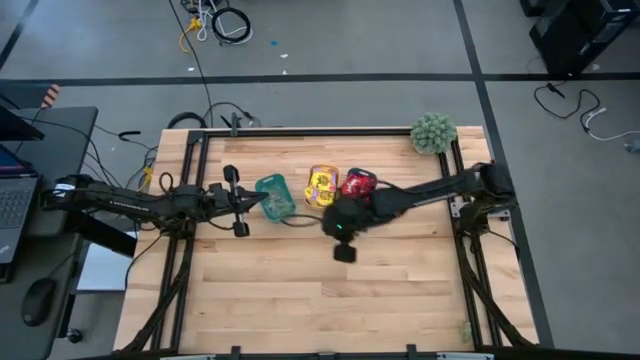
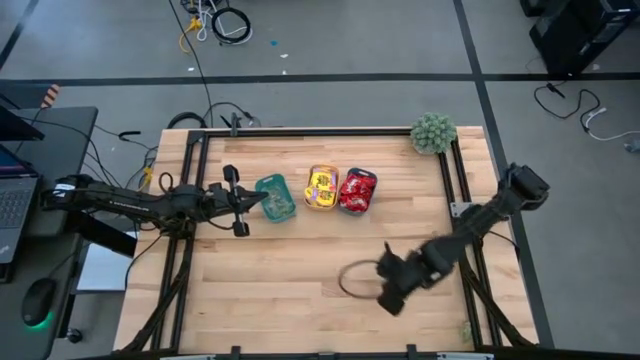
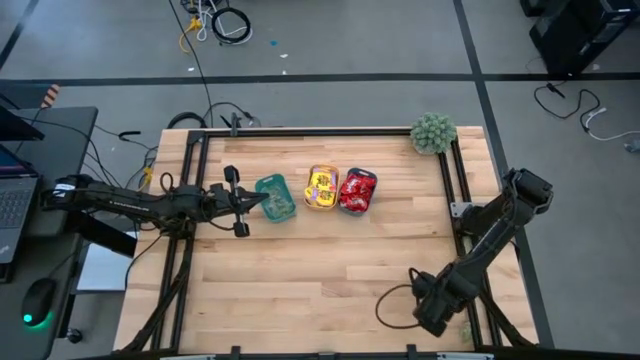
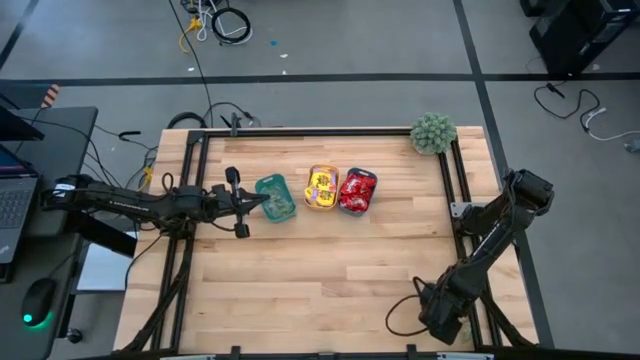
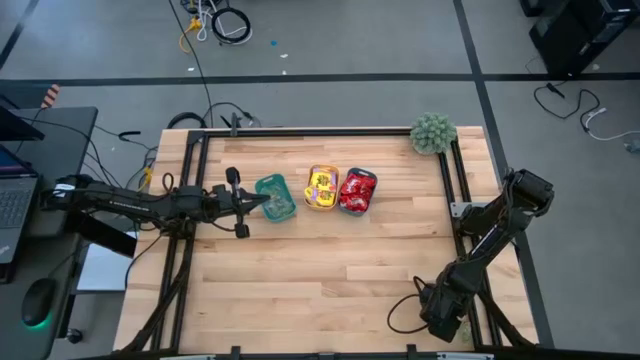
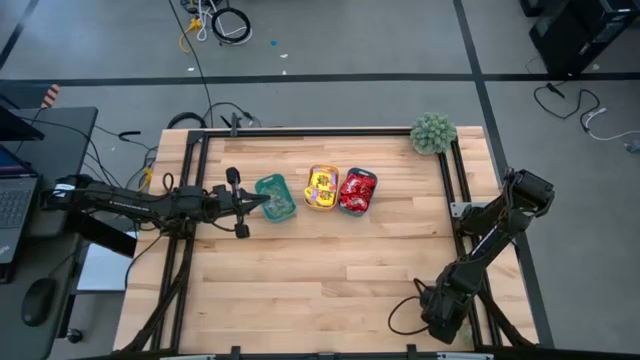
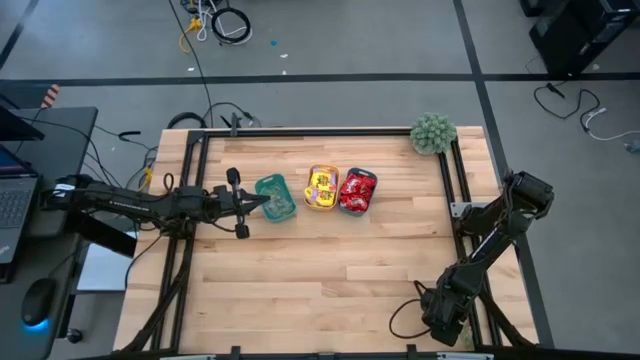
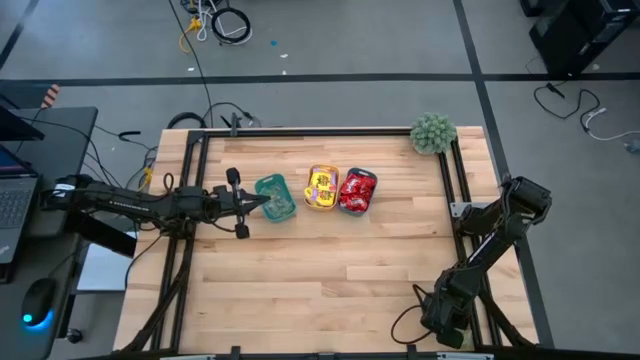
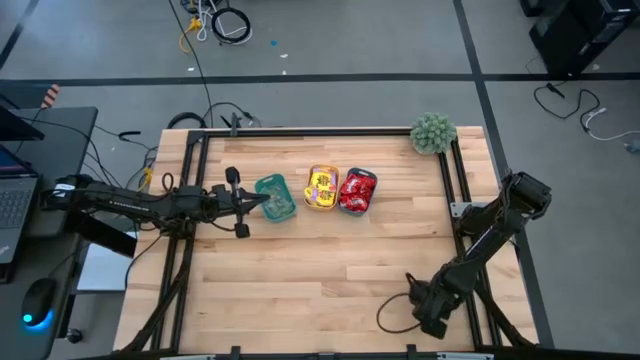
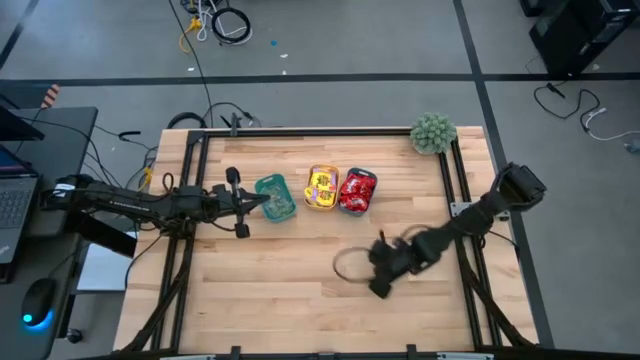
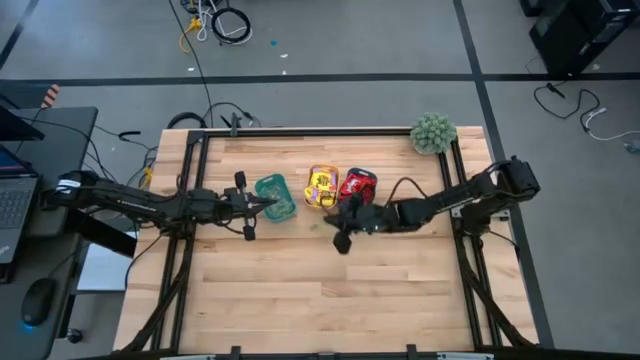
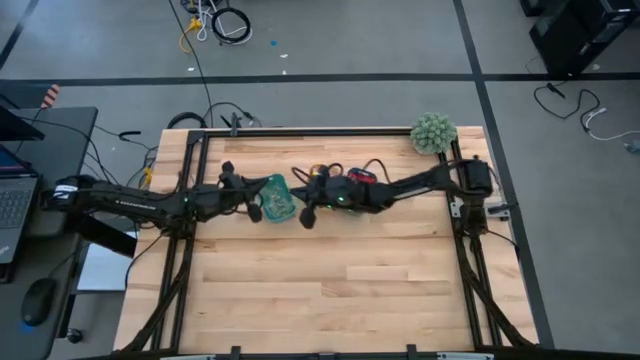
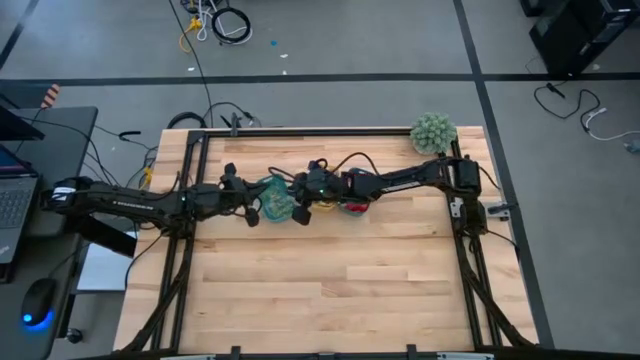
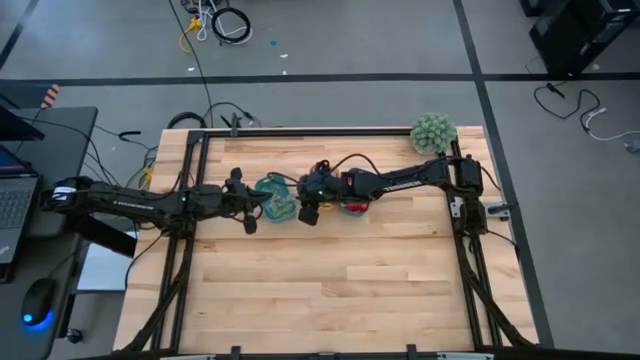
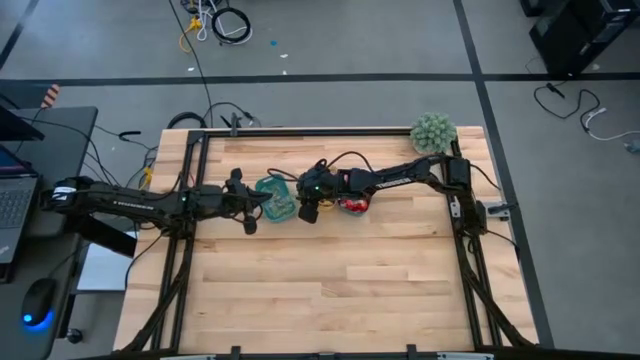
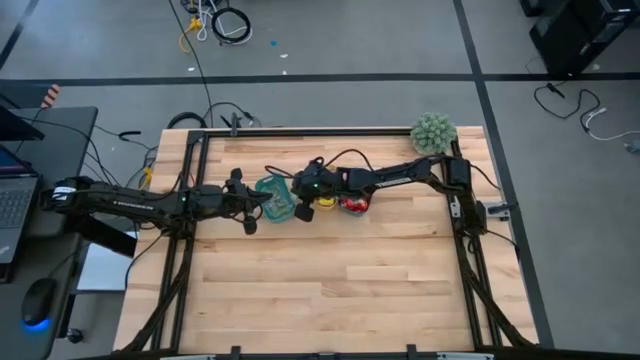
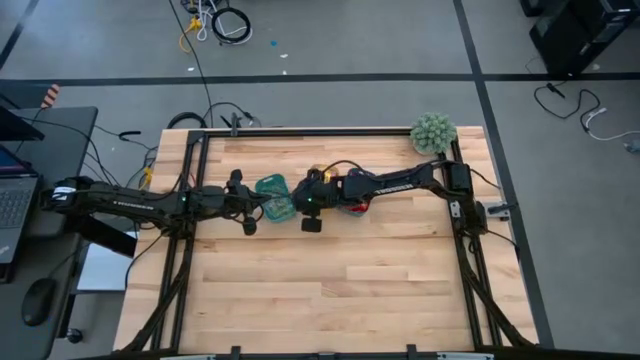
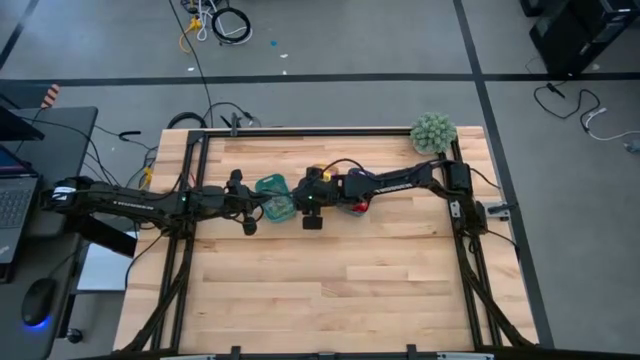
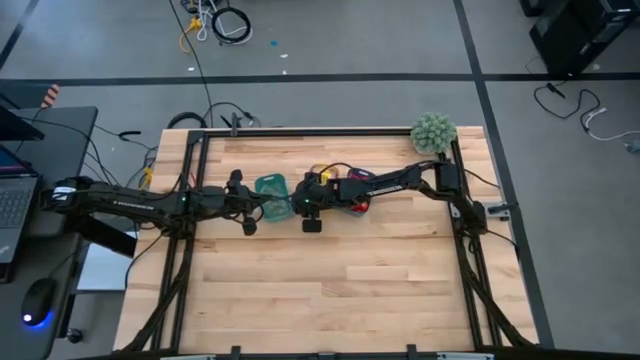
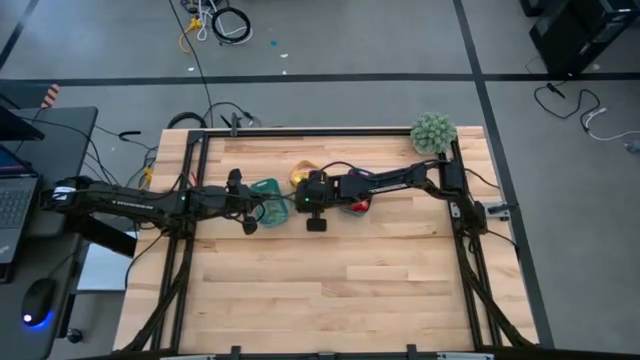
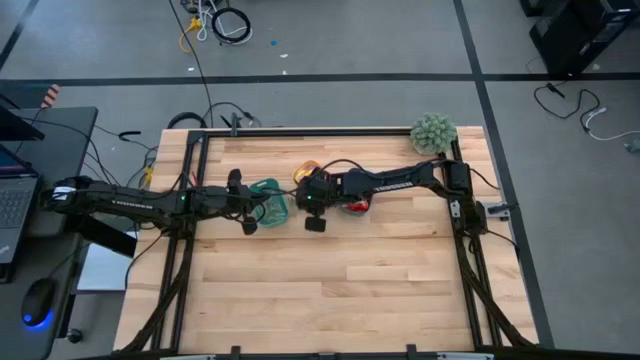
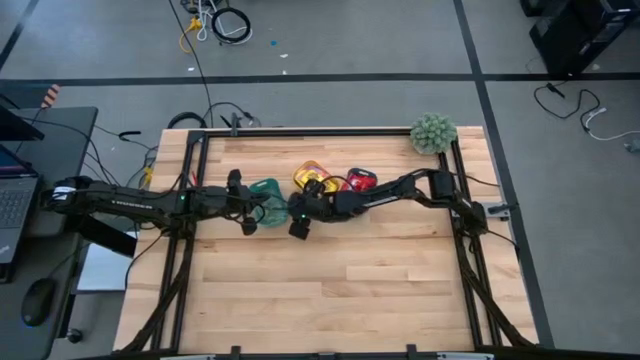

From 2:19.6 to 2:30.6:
Task: Sort candy
Put the green gummy into the green bin

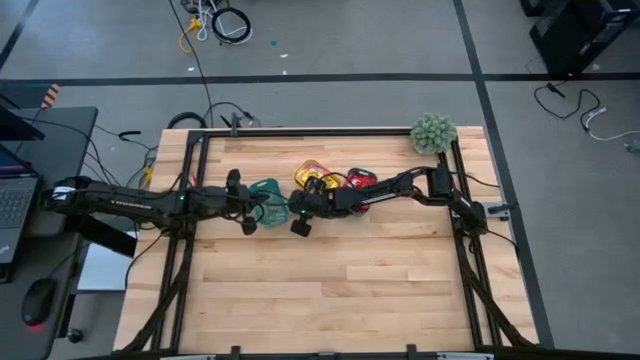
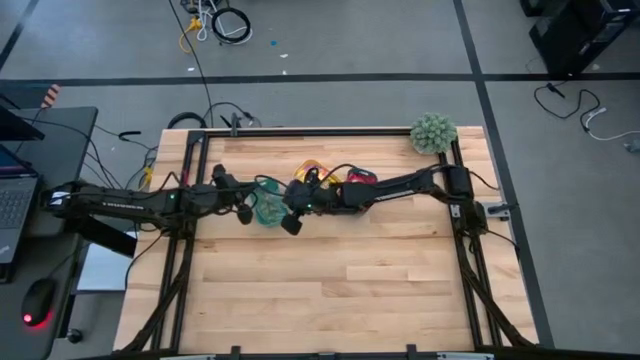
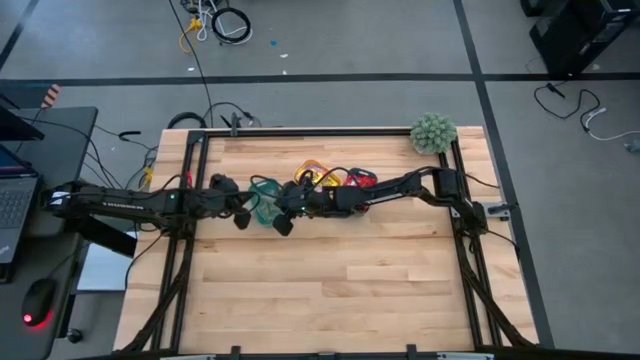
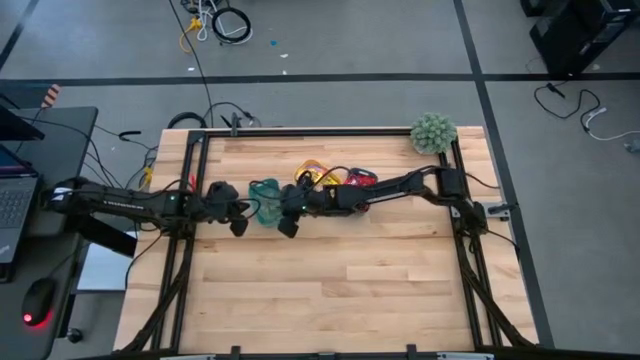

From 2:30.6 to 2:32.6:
Put the green gummy into the green bin

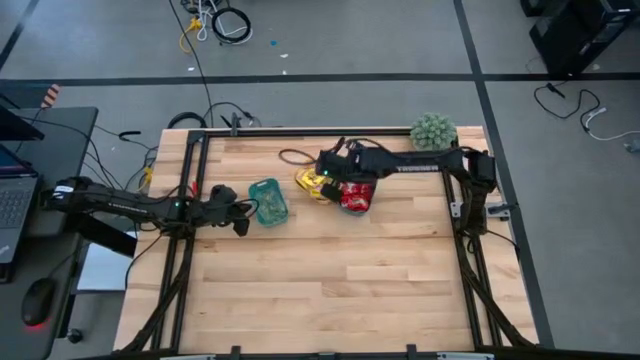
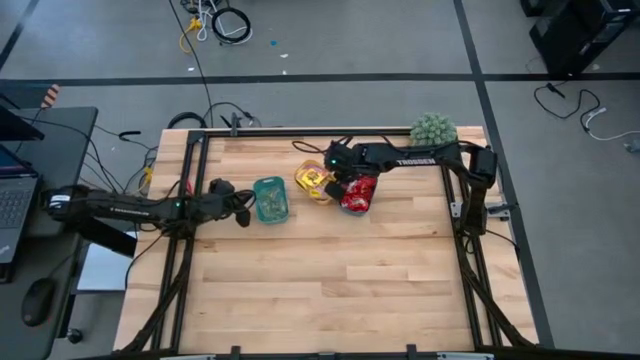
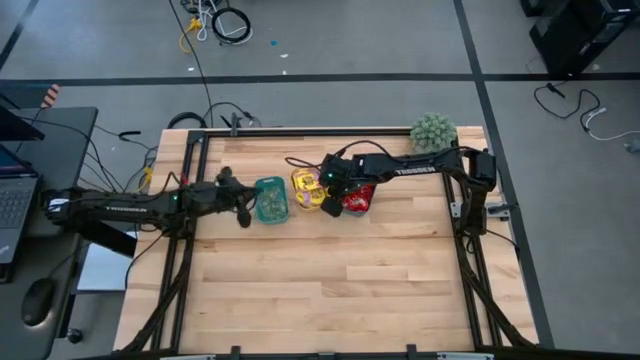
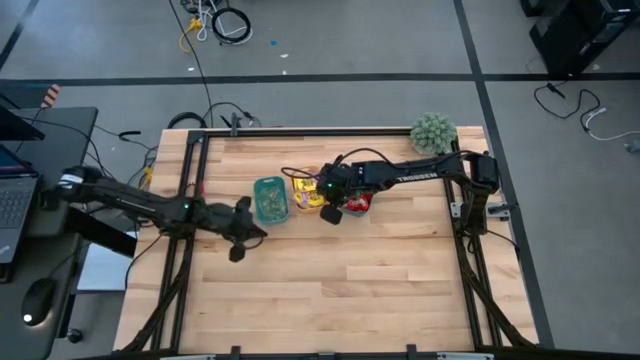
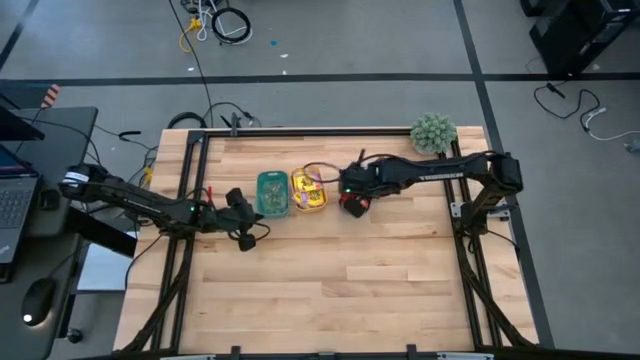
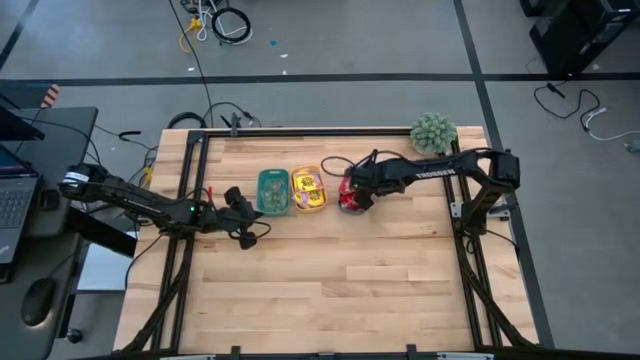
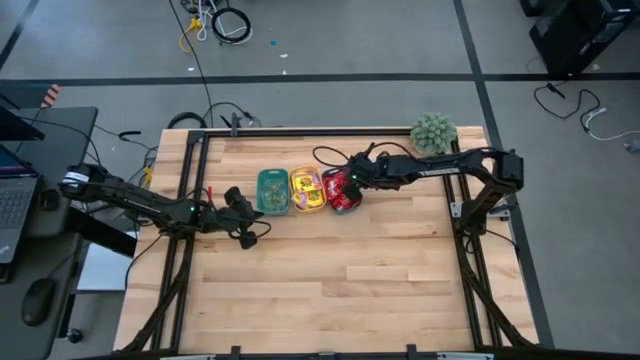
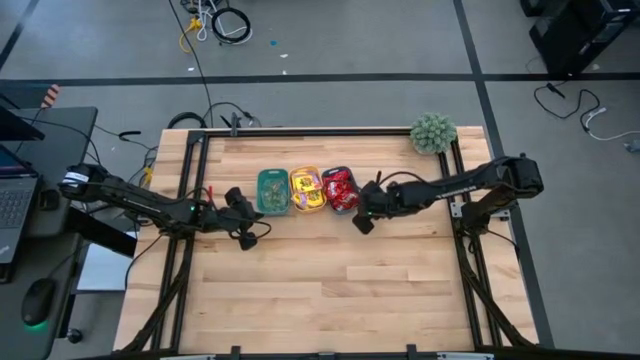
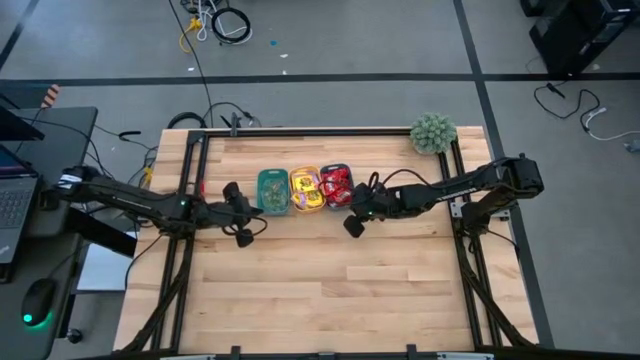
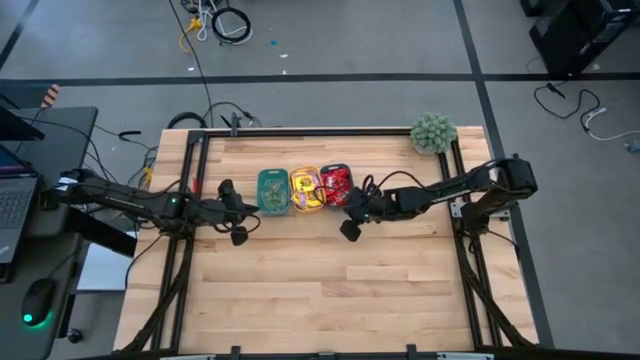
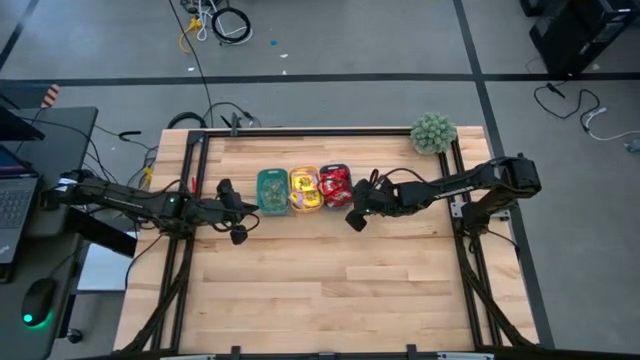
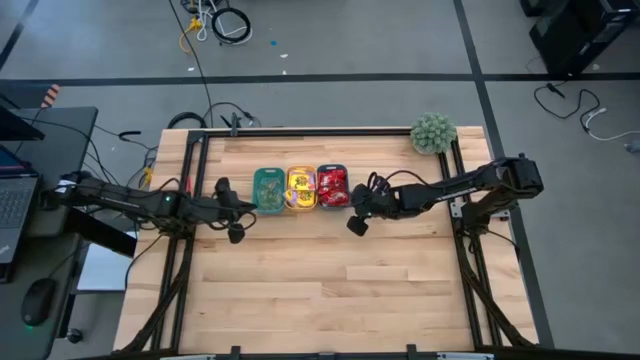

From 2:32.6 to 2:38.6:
Adjust the colored bins

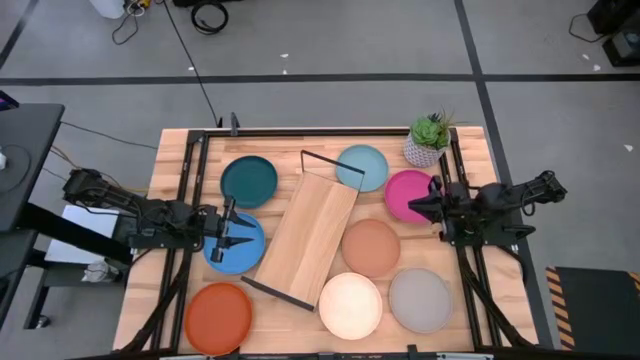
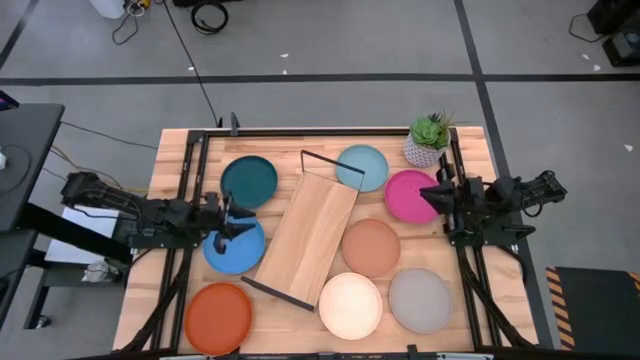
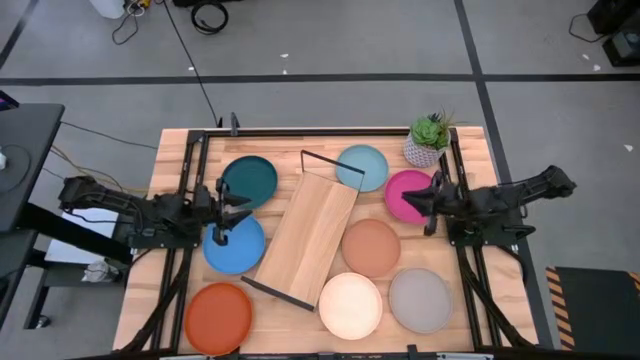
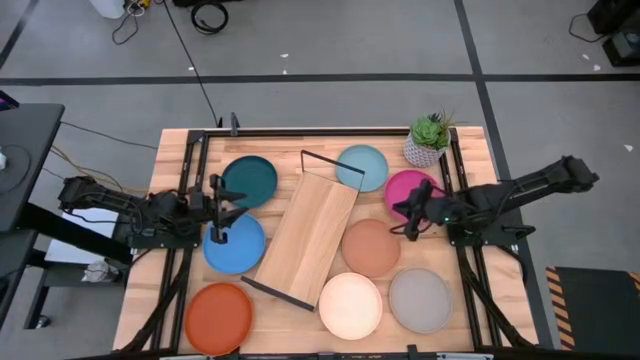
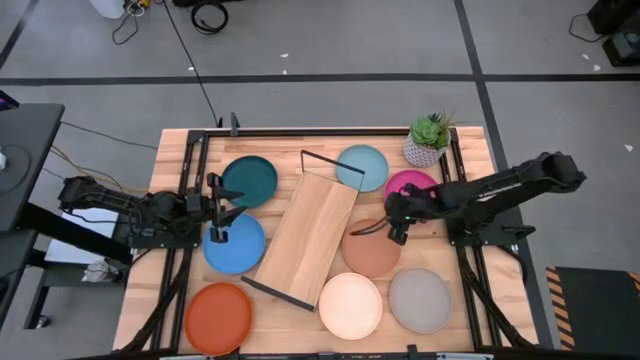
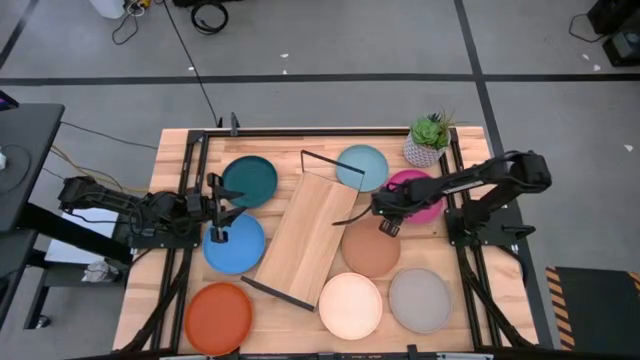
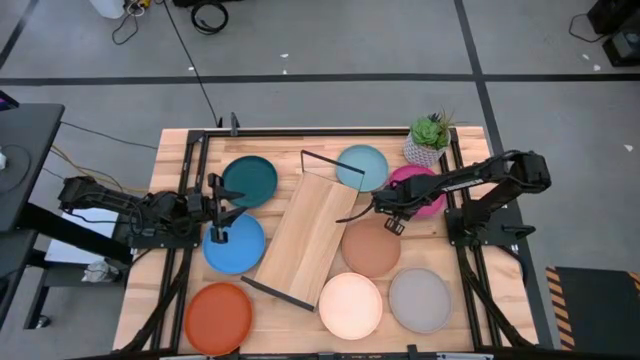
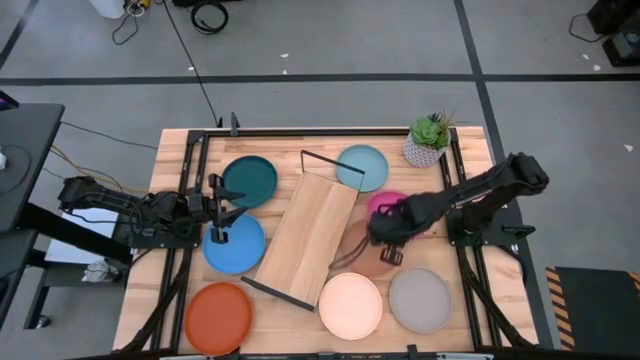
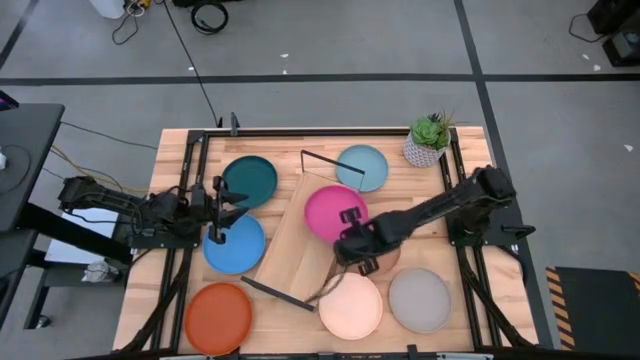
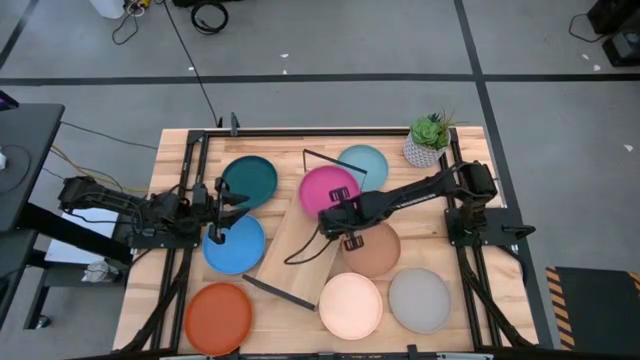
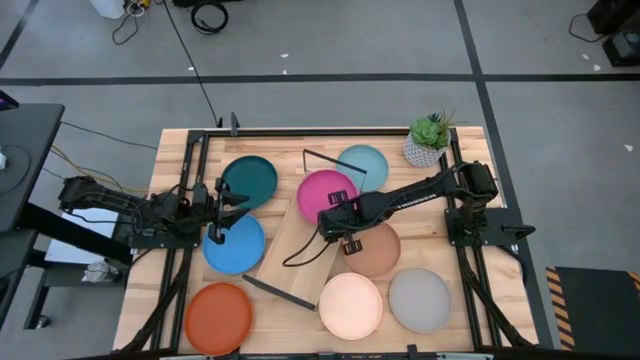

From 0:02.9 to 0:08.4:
Task: Place and stack plates onto a shelf
Put the pink plate on the shelf
